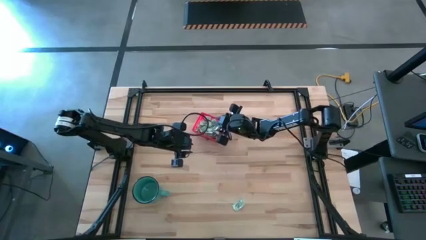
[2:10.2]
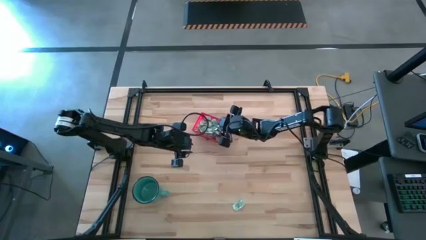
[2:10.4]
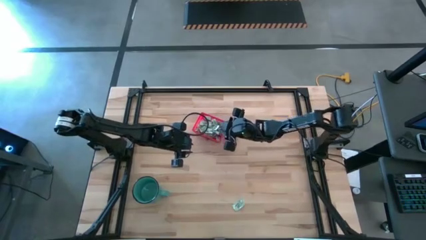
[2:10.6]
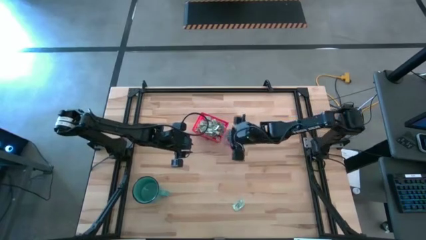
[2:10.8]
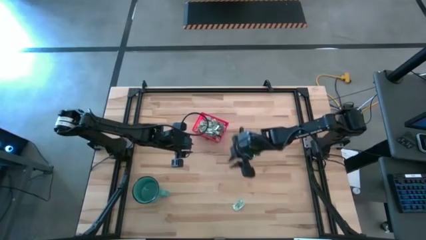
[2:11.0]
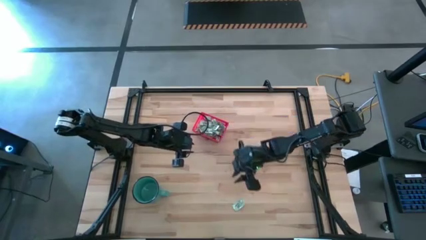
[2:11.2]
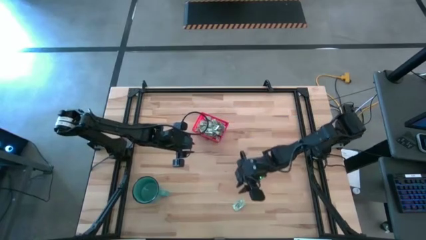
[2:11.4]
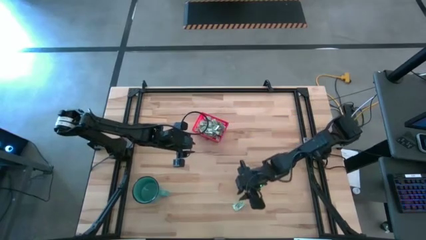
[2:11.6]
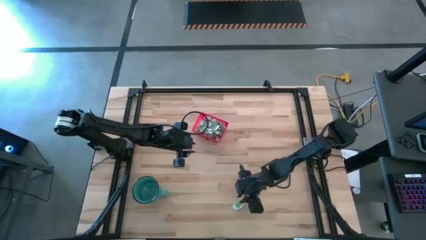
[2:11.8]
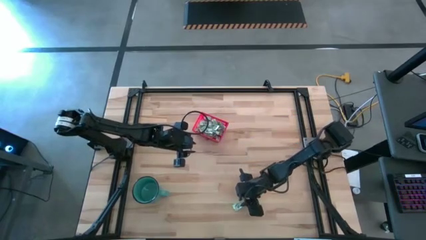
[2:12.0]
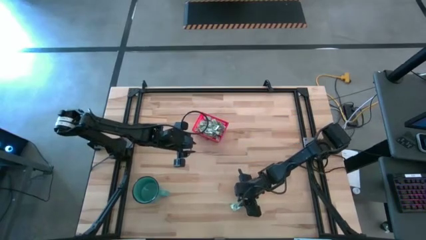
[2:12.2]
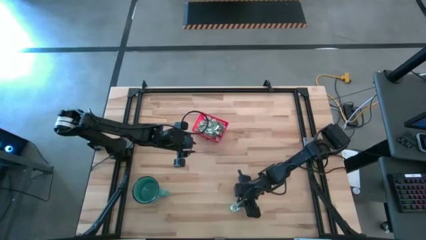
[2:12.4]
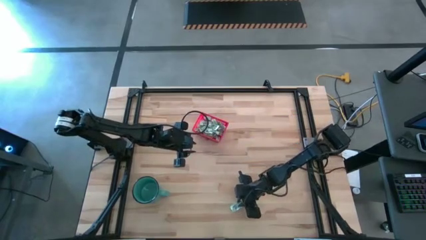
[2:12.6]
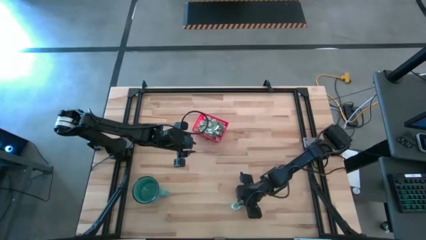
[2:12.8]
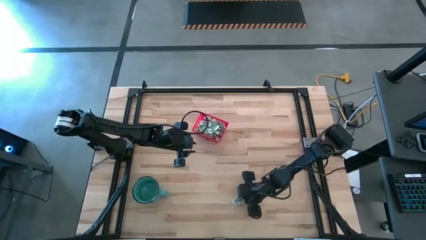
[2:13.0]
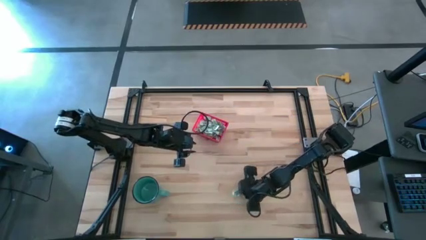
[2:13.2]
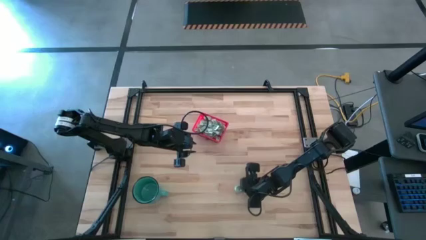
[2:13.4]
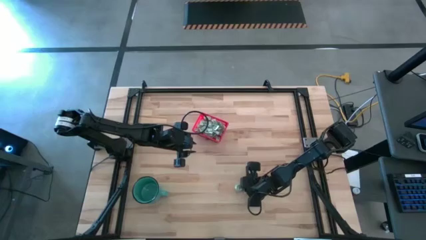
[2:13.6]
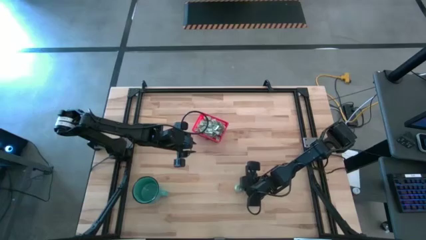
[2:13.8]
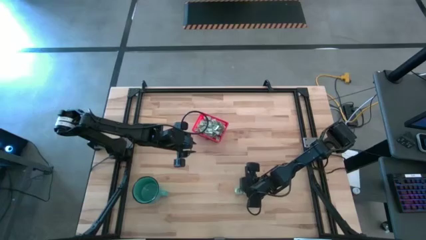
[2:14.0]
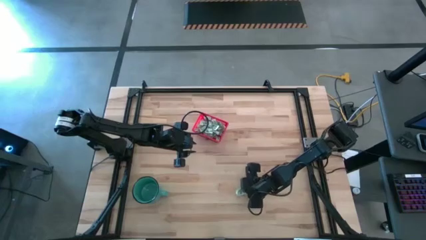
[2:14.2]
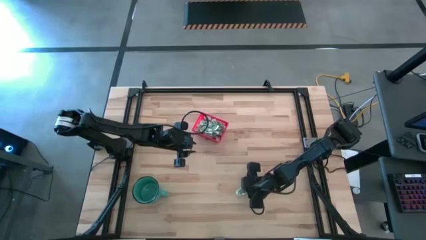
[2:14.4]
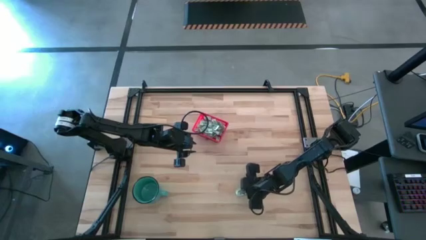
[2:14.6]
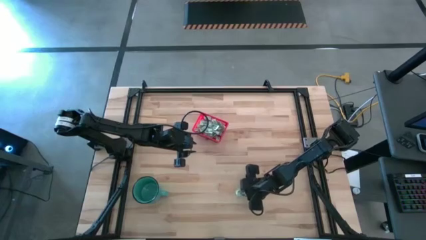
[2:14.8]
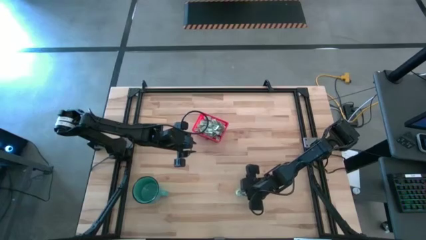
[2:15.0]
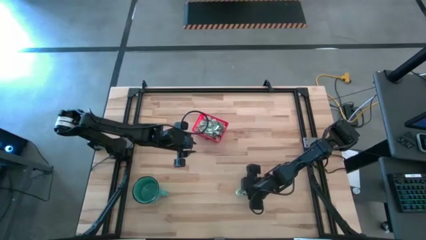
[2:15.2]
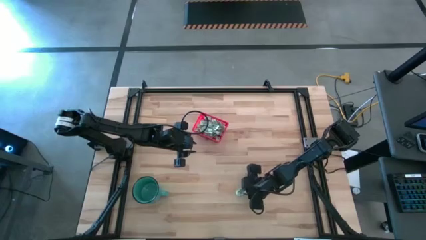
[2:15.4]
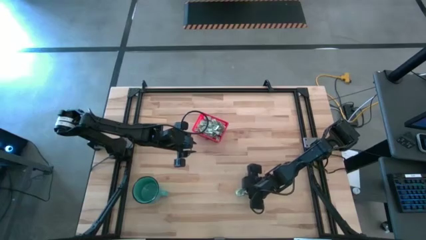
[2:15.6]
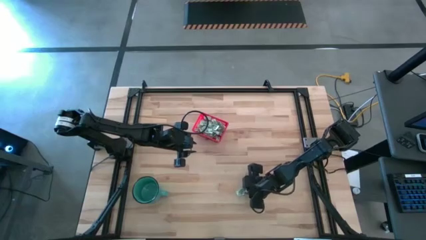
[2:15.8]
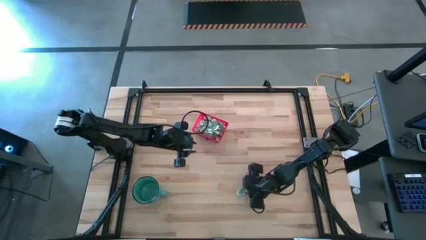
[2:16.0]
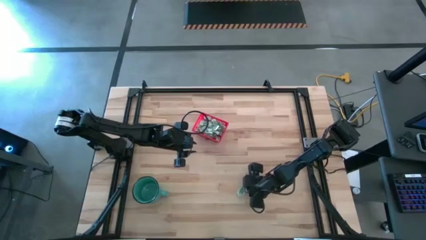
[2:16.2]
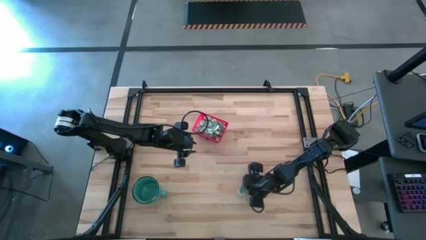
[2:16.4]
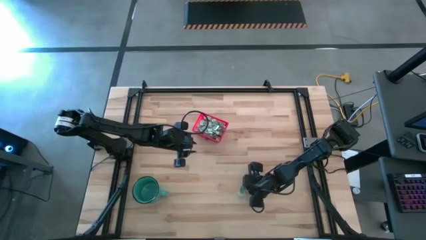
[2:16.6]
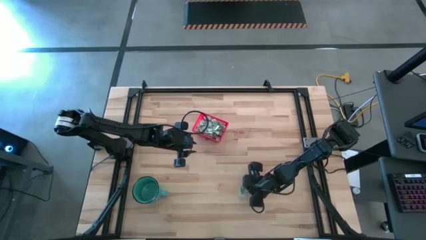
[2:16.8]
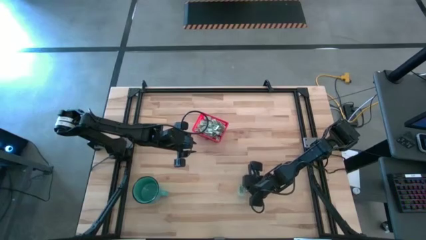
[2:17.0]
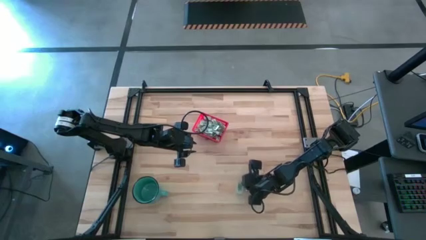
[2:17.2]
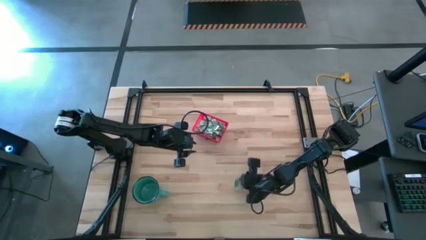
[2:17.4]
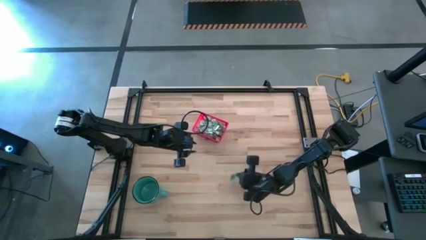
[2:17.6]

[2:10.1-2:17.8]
Task: Pick and place items into bin
Put the stevia packet into the red bin

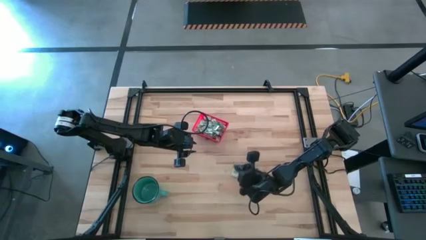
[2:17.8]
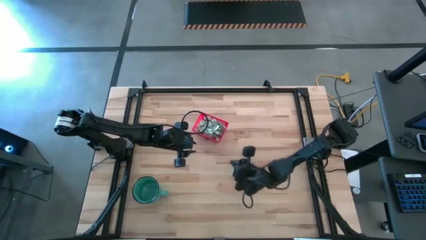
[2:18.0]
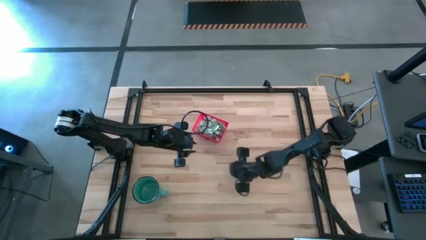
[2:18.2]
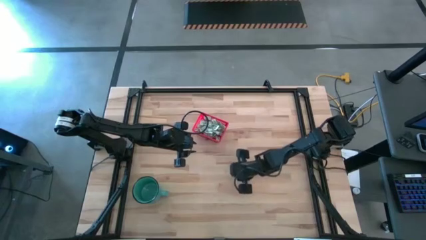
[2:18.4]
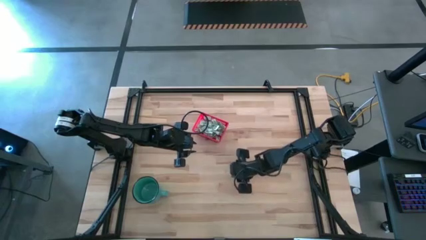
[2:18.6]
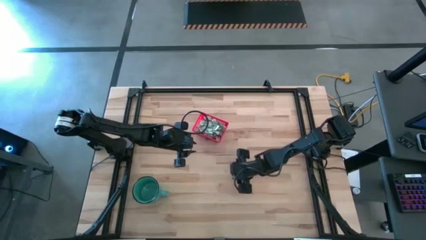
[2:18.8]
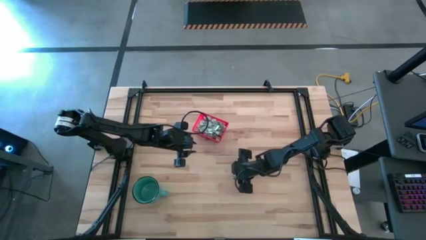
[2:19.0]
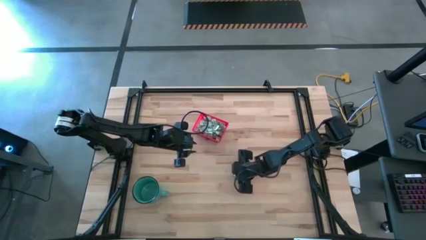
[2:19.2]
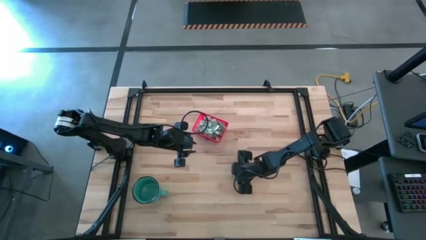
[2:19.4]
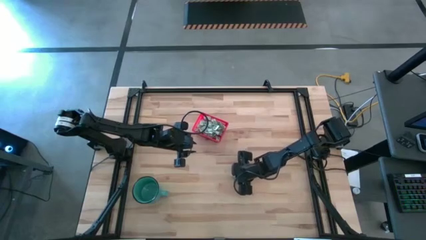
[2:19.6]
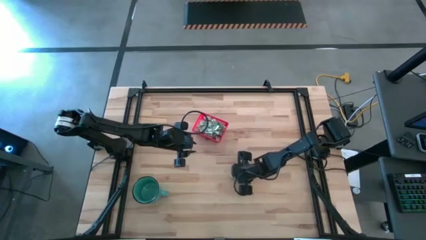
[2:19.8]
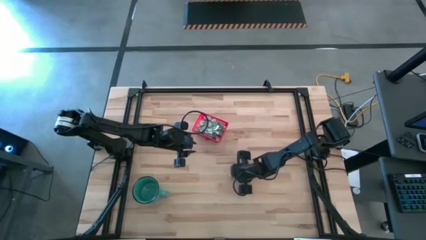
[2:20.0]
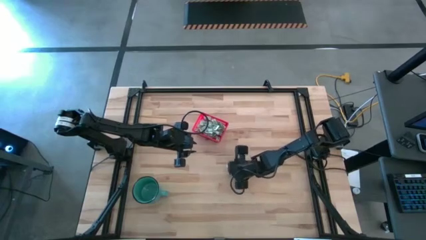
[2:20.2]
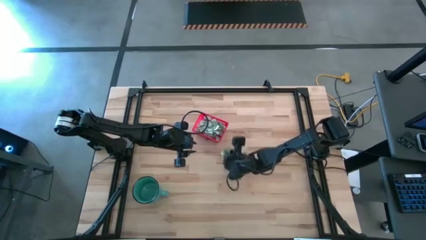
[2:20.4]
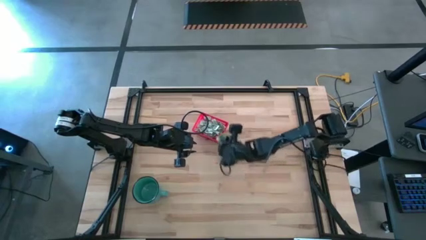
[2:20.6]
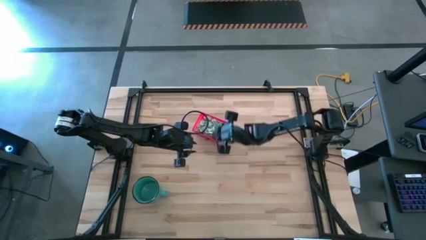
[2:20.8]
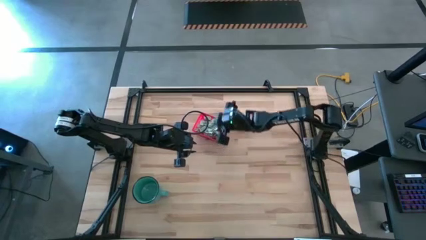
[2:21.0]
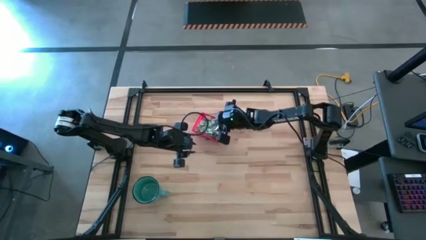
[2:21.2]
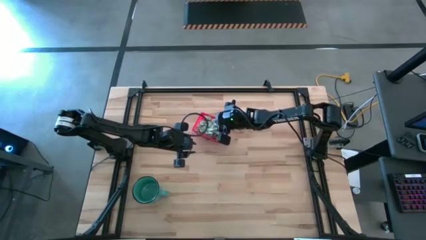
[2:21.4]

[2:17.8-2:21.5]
Put the stevia packet into the red bin

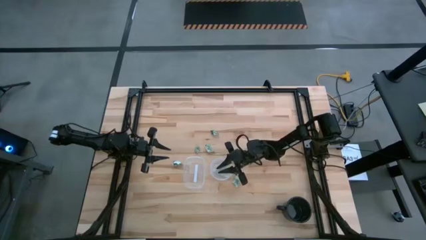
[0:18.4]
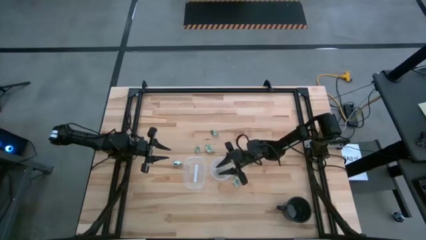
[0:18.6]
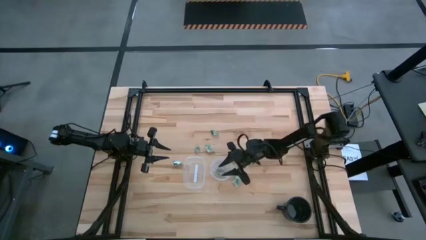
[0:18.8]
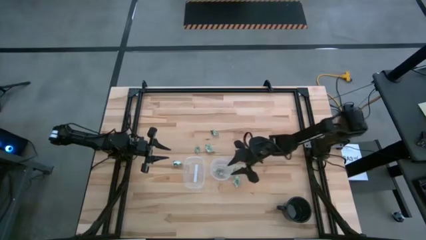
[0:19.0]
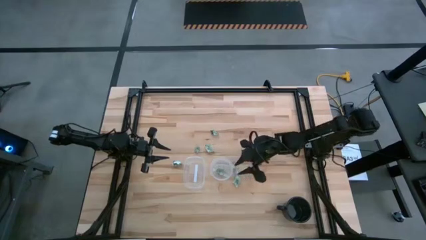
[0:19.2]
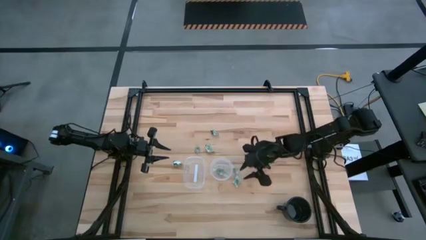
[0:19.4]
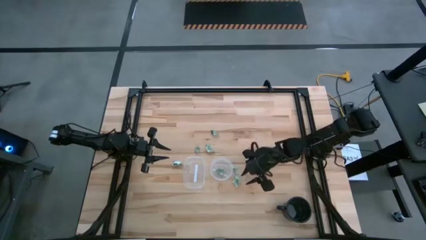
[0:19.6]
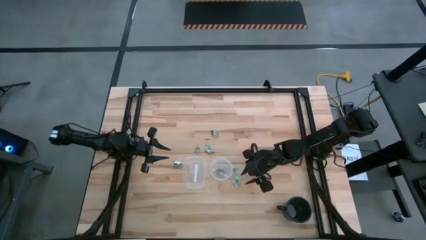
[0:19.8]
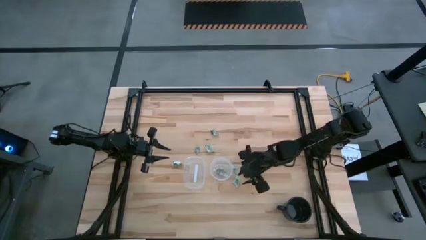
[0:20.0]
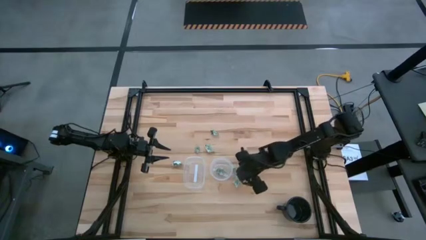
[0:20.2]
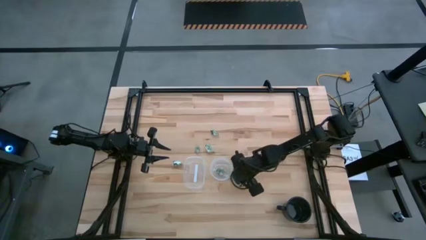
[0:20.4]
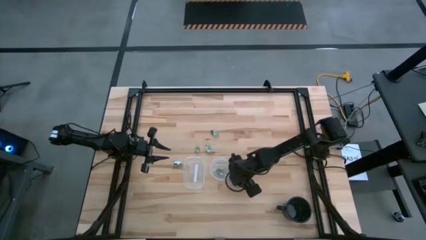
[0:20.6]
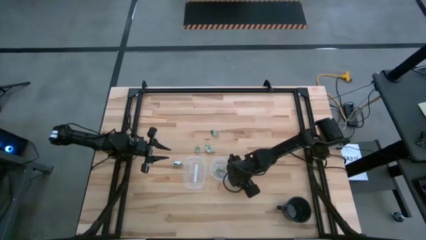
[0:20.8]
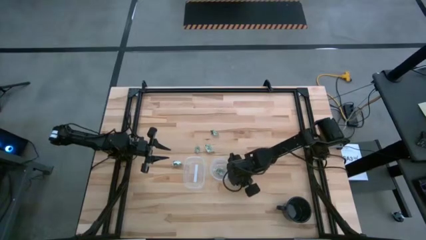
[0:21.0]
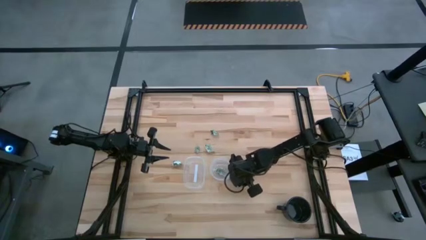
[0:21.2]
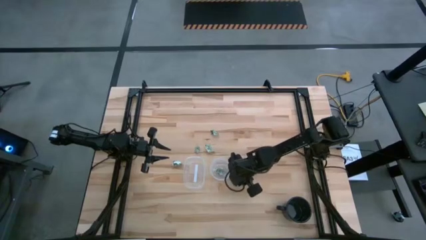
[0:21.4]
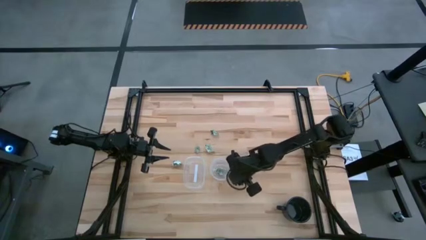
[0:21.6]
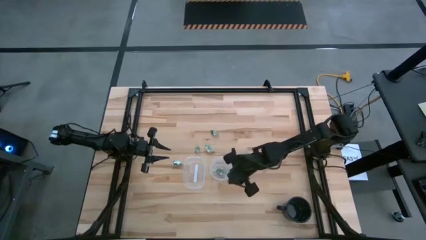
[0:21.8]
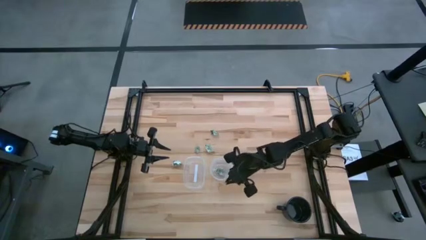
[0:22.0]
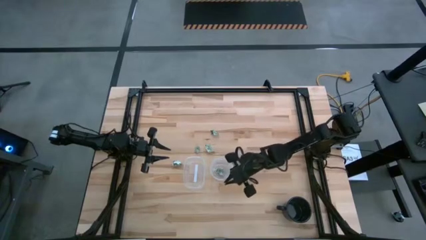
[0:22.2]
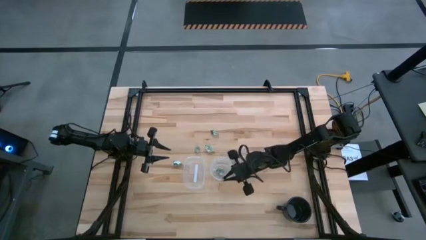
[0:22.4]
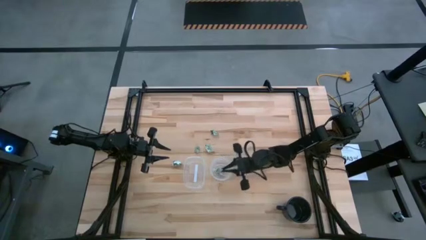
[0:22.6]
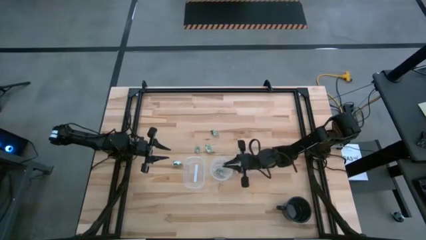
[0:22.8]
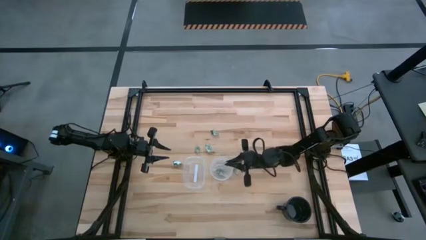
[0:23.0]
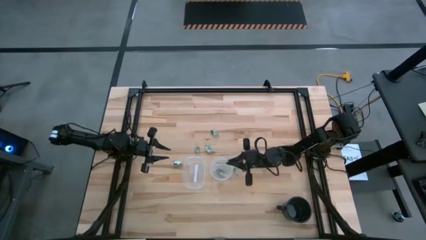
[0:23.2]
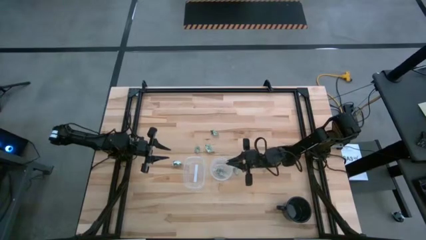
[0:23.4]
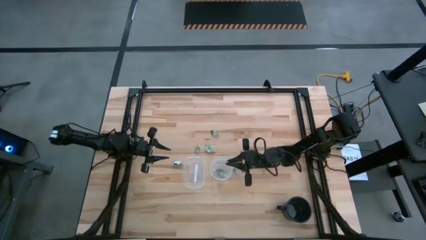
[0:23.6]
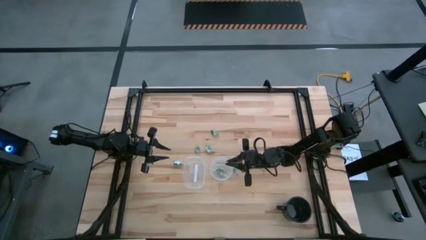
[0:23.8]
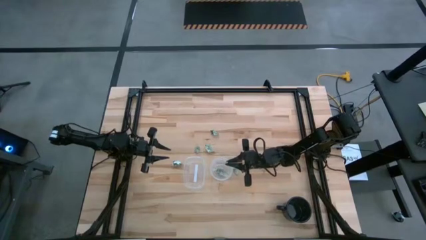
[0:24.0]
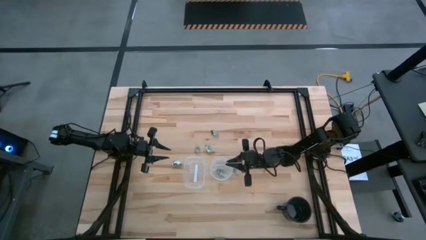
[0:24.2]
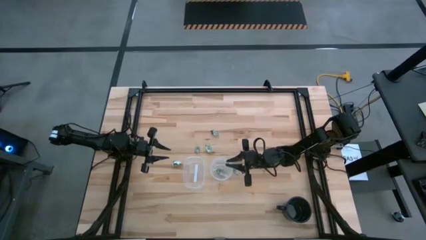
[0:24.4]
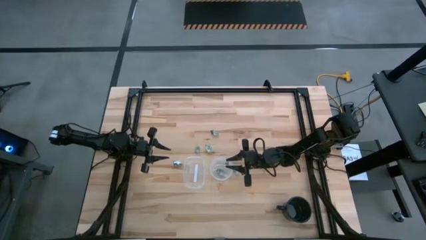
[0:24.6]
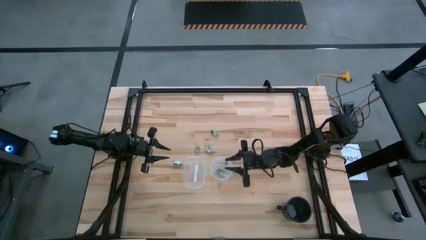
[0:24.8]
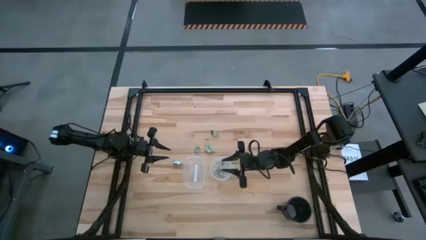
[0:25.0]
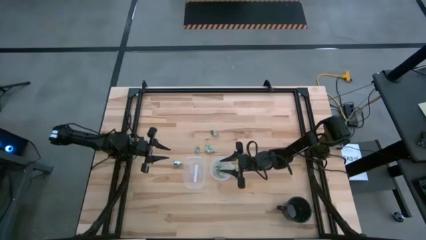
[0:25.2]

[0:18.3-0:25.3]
Task: Pick and place items into bin
Put the stevia packet into the right transparent bin
